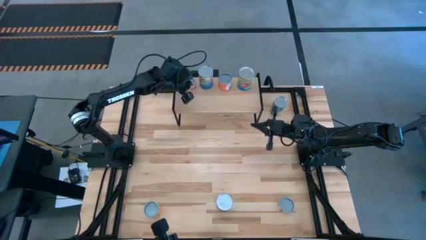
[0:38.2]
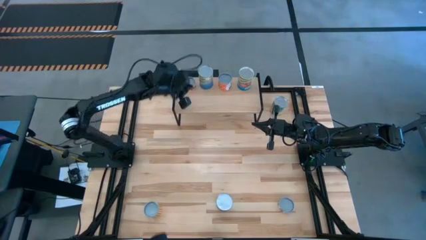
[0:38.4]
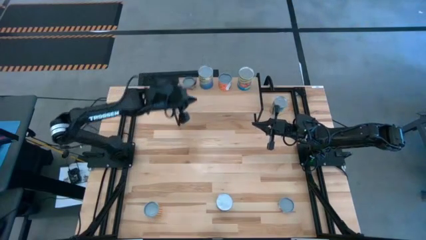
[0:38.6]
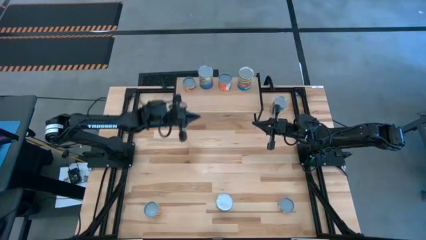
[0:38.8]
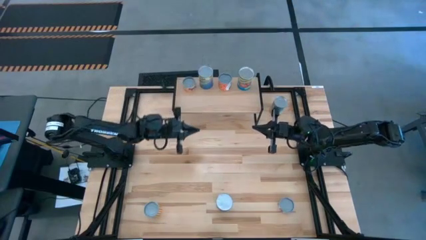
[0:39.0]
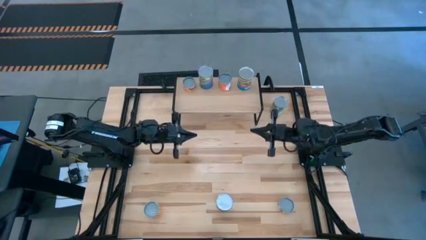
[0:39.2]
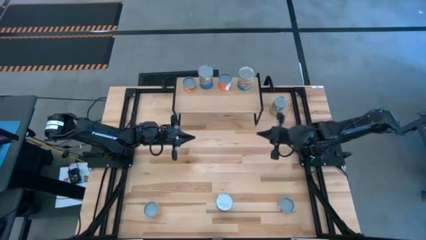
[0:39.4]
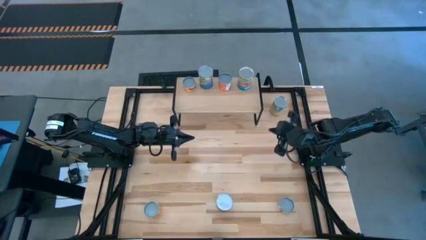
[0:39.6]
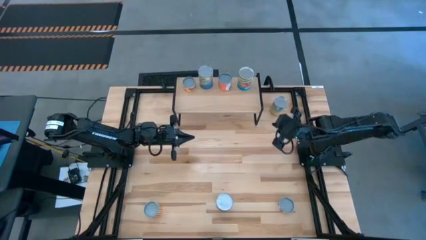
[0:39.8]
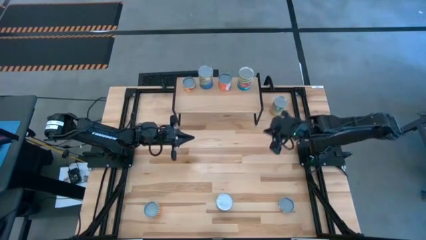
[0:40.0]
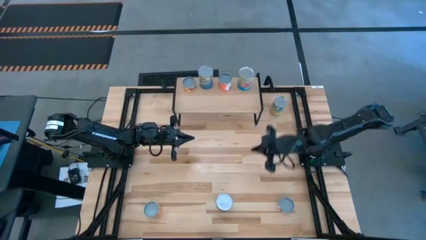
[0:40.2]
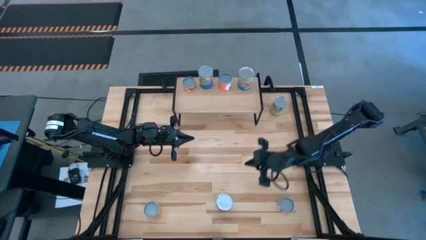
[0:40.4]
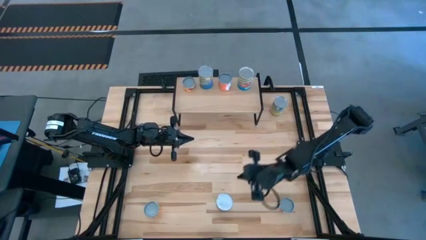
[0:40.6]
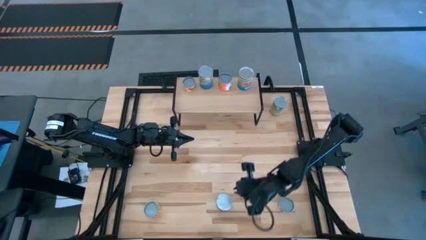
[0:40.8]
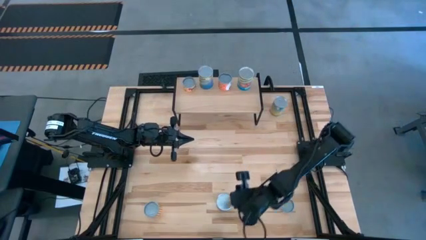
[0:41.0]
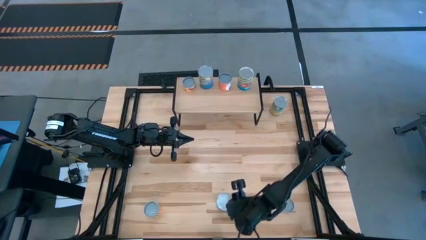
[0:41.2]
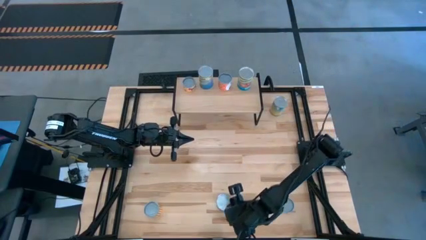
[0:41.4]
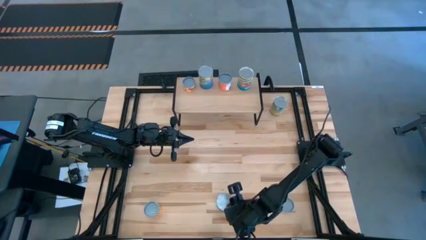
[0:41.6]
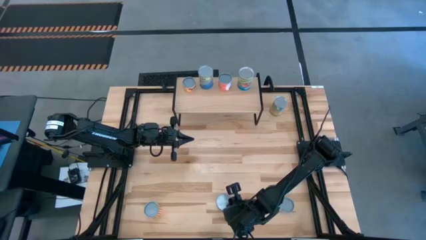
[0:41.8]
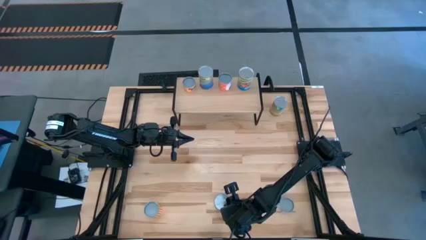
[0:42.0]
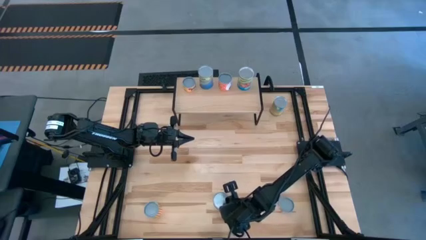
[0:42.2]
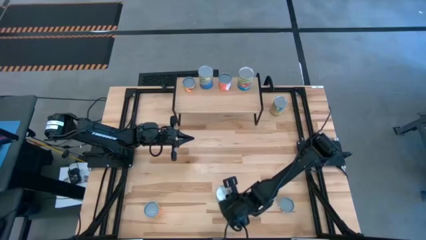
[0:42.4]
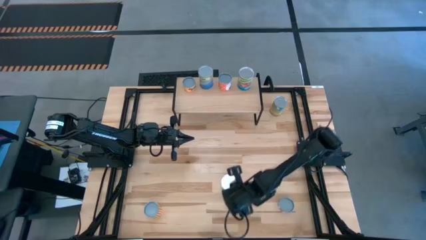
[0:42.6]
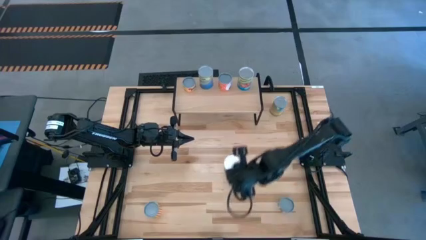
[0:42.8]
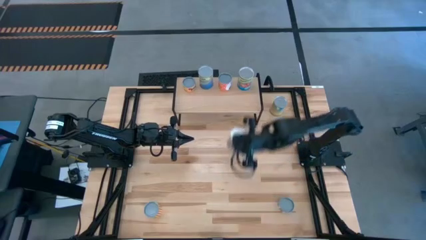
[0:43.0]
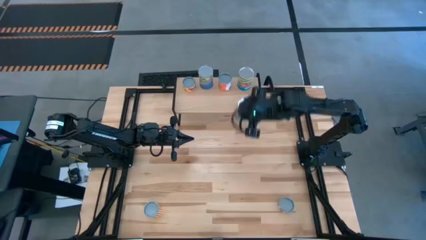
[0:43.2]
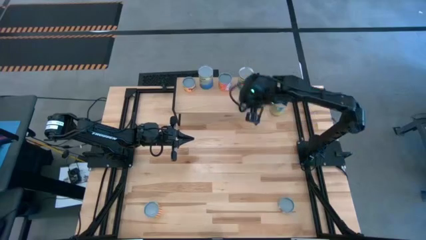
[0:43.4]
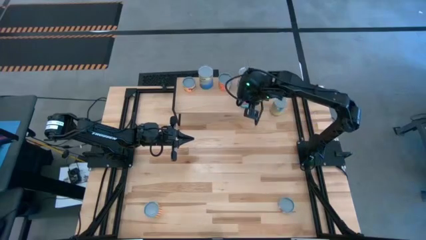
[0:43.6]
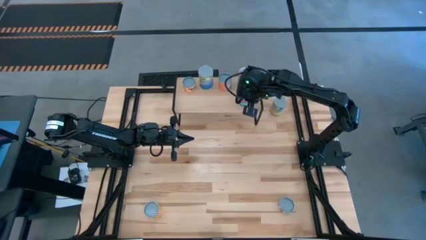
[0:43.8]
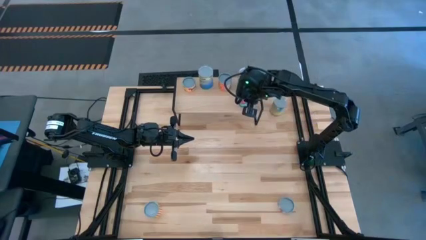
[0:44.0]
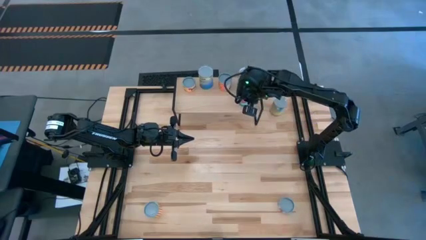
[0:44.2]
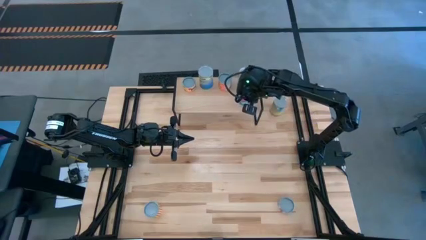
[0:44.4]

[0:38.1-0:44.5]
Task: Pick and place cans onto a shelf
Put the canned tomatoes on the shelf aligned with the canned tomatoes

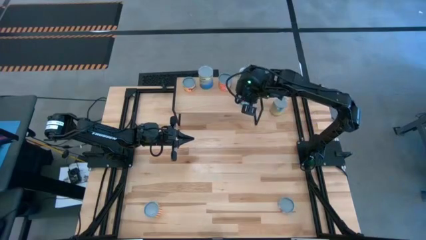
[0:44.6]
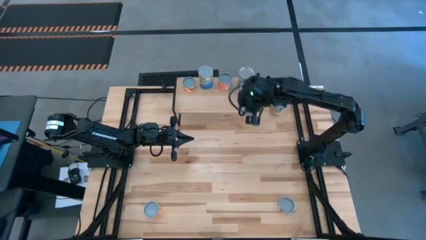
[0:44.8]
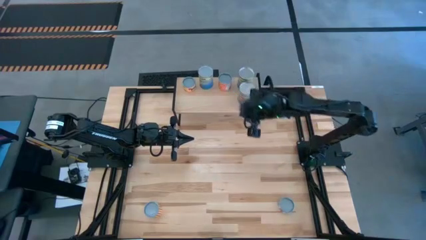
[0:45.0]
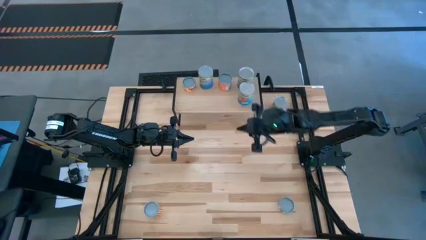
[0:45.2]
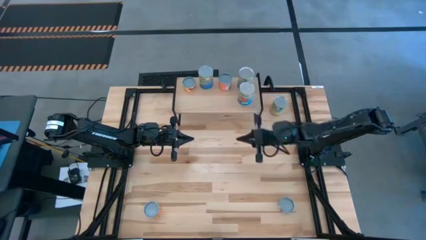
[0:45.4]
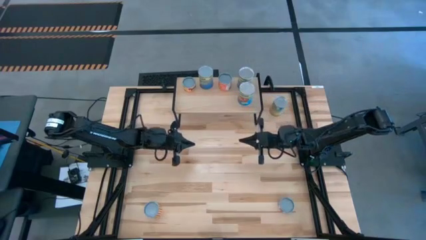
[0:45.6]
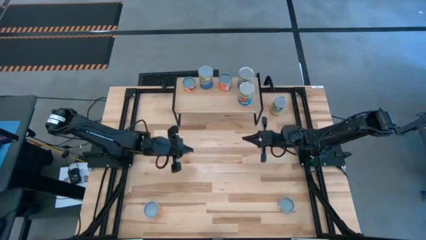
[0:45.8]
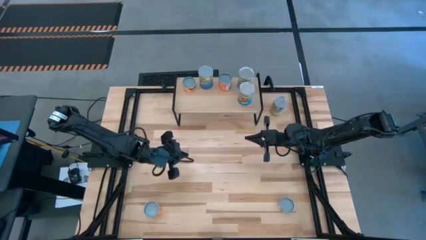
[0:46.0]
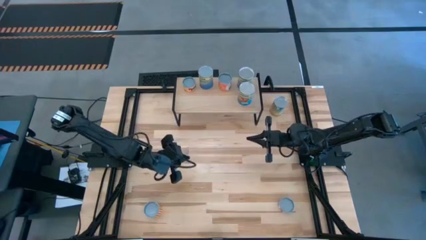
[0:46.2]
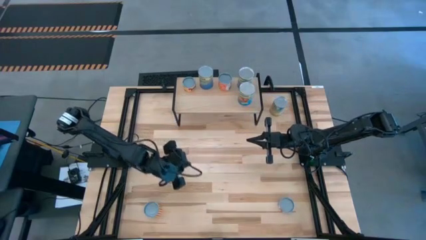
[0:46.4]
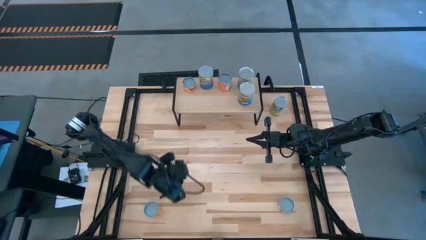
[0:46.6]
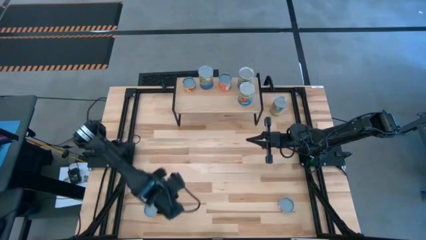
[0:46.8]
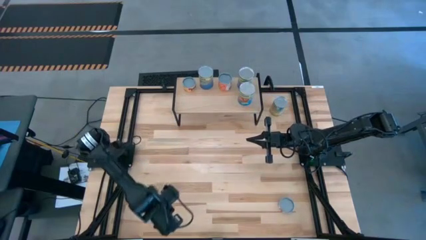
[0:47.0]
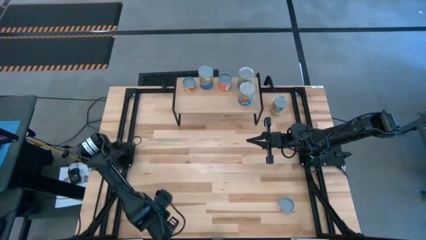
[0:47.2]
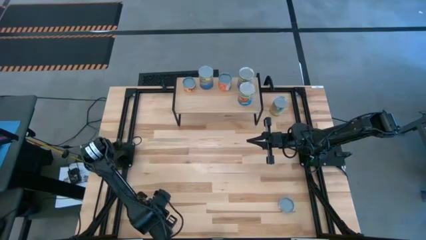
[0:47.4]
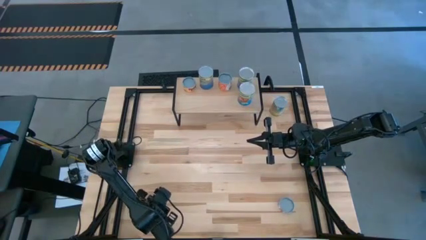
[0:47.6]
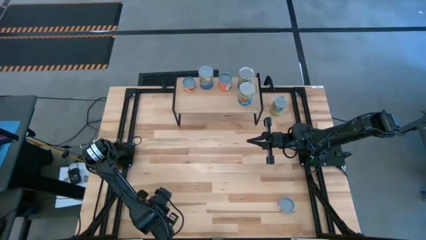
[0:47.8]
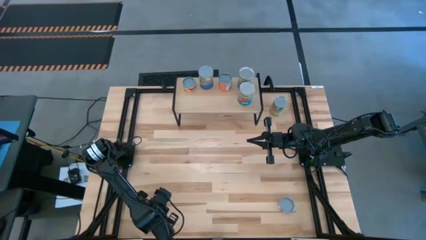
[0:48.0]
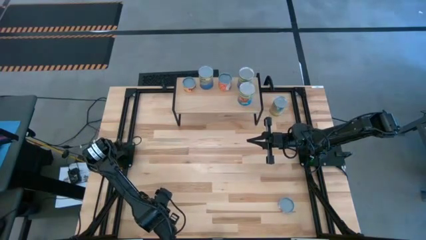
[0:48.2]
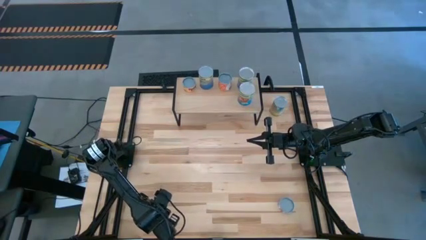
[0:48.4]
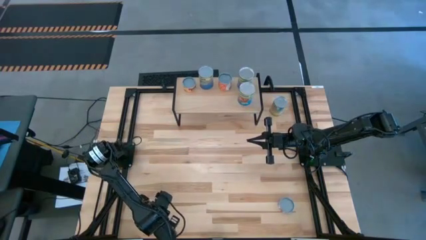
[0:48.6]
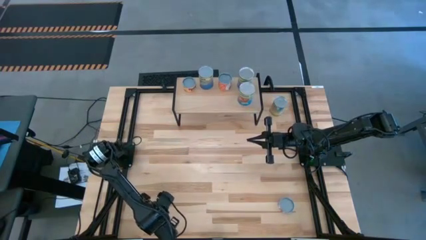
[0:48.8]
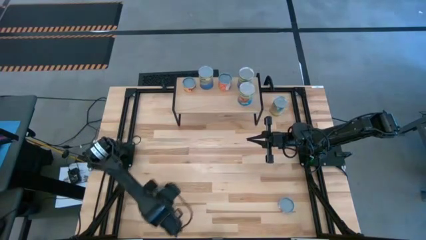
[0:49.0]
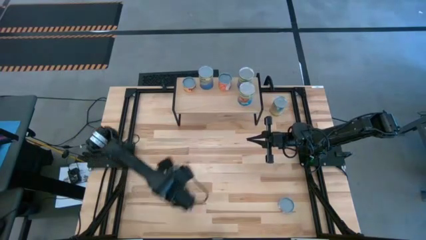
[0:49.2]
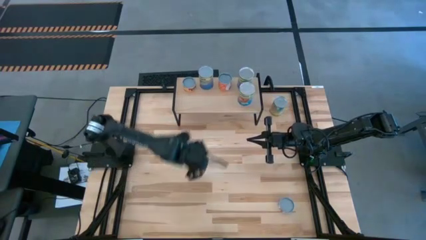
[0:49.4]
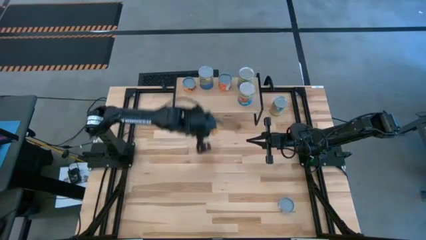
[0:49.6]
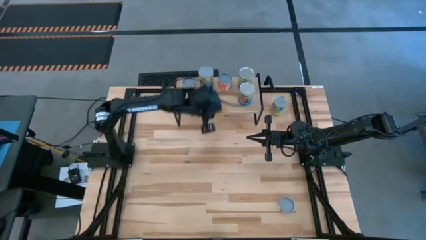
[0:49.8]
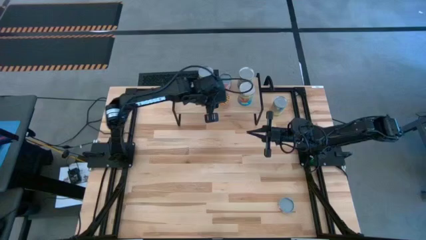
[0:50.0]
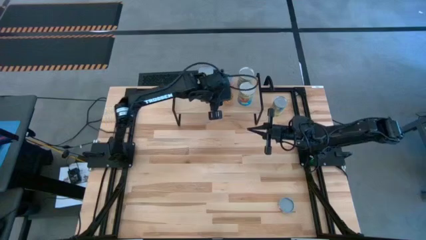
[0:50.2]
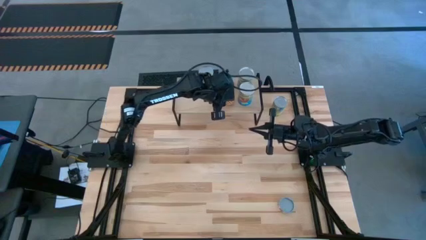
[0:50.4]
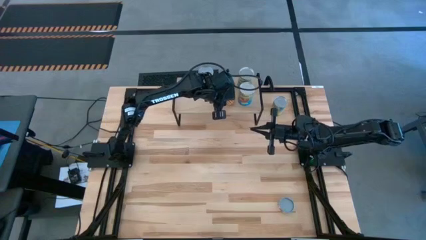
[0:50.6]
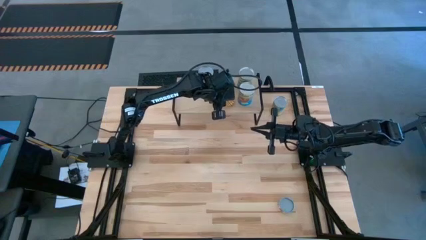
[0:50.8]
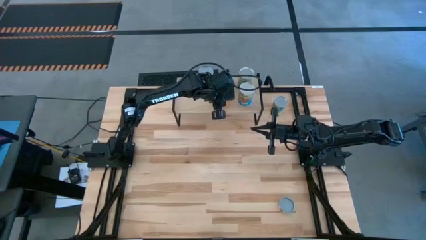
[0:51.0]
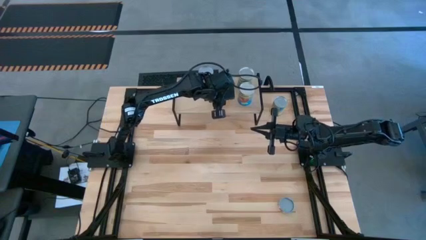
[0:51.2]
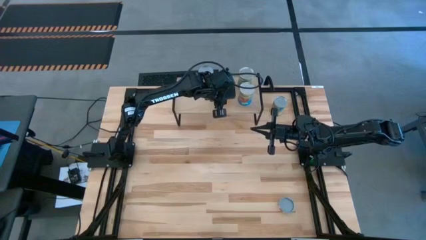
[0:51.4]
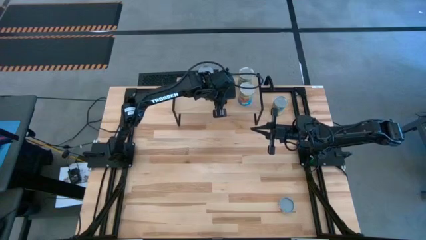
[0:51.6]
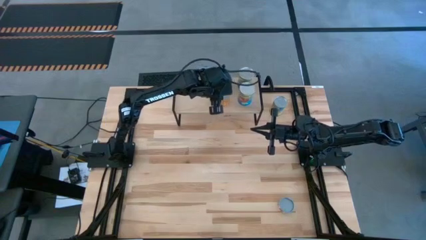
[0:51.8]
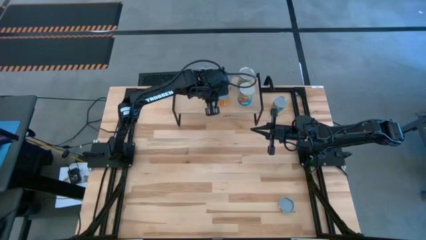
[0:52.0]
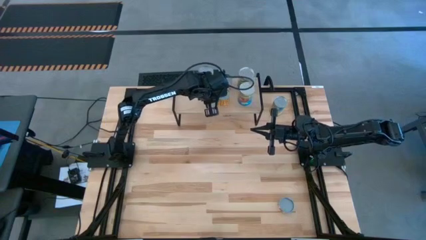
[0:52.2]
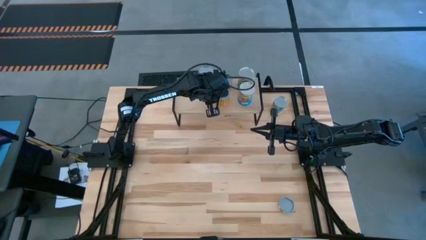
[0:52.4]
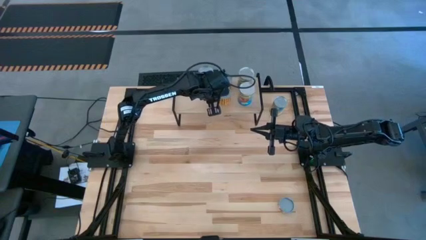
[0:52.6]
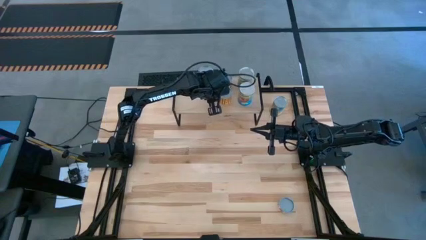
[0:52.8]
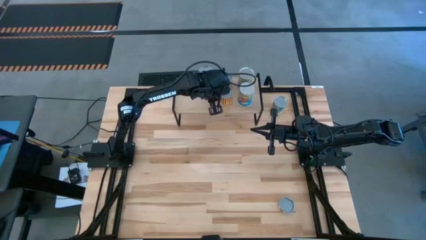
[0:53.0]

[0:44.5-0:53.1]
Put the yellow can on the shelf aligned with the orange can
